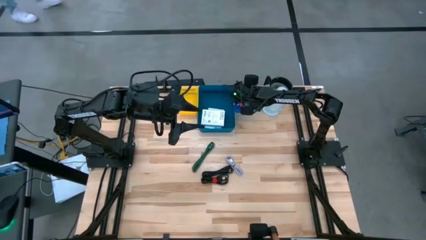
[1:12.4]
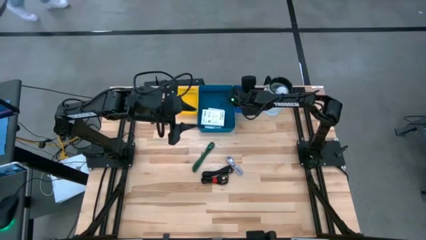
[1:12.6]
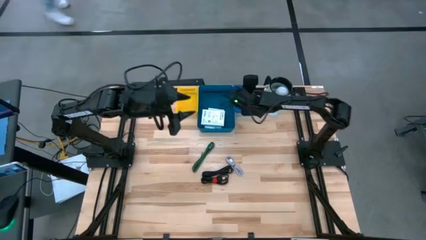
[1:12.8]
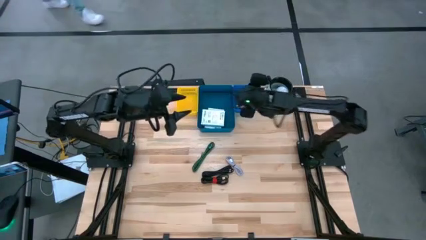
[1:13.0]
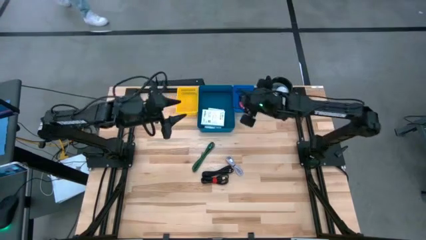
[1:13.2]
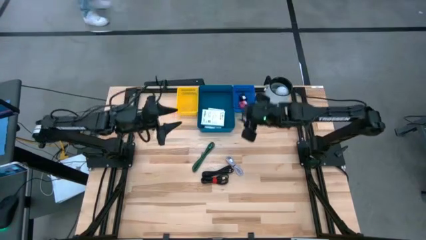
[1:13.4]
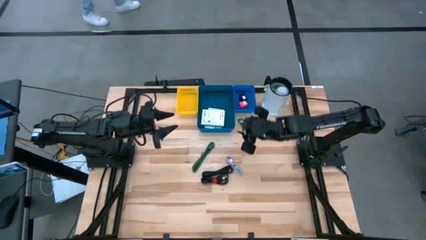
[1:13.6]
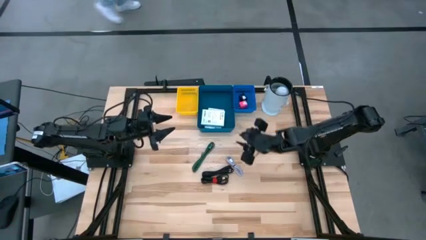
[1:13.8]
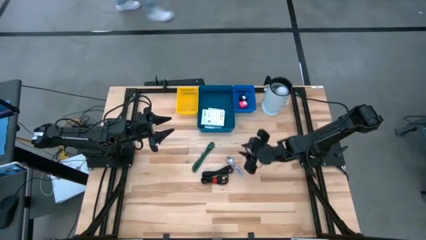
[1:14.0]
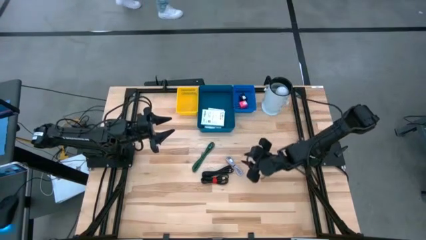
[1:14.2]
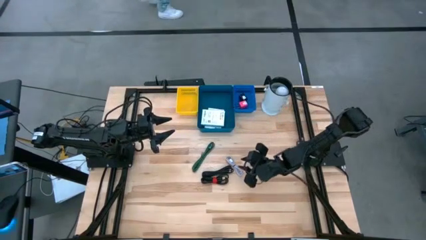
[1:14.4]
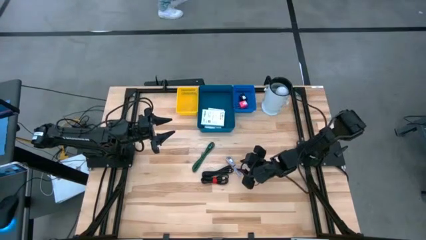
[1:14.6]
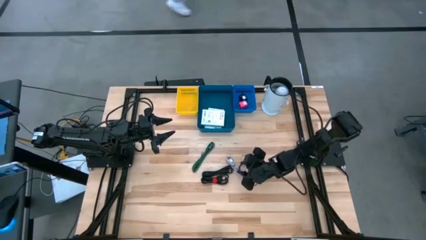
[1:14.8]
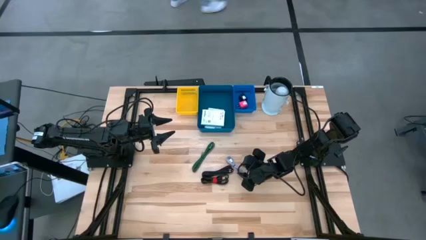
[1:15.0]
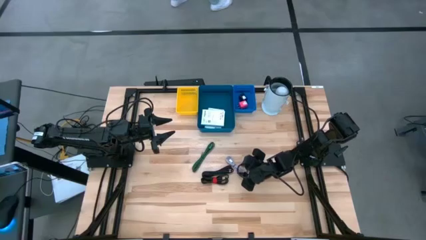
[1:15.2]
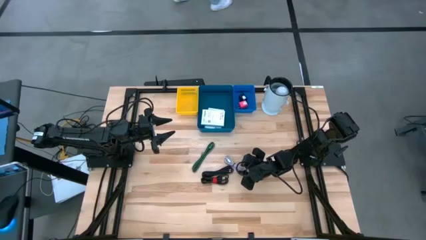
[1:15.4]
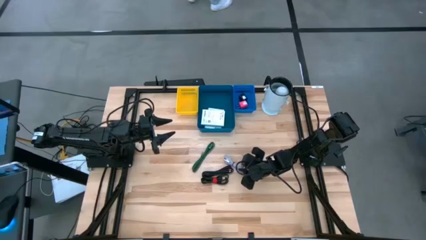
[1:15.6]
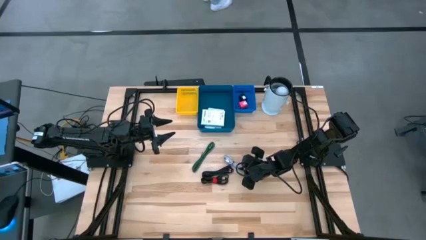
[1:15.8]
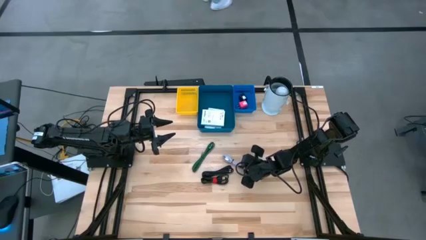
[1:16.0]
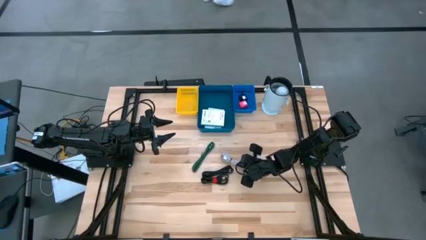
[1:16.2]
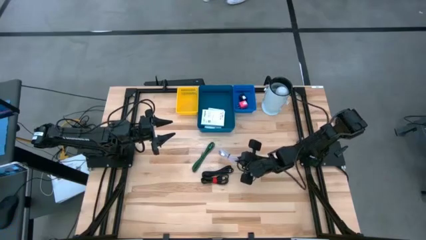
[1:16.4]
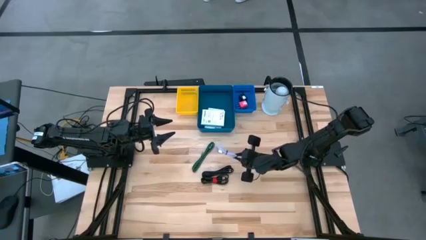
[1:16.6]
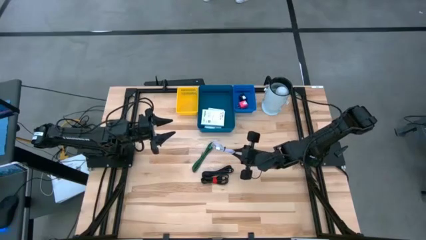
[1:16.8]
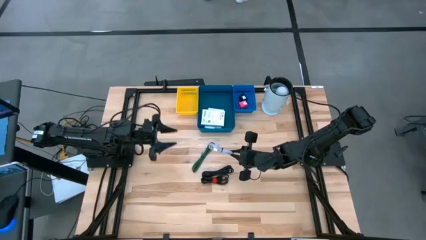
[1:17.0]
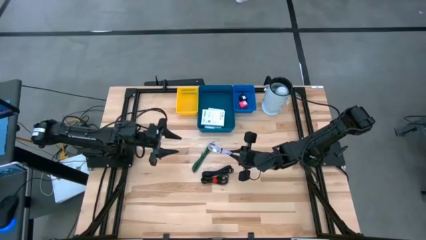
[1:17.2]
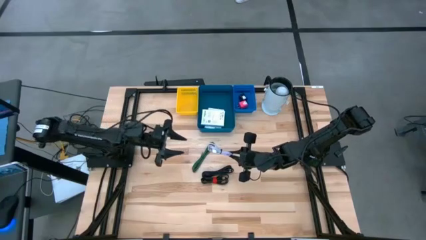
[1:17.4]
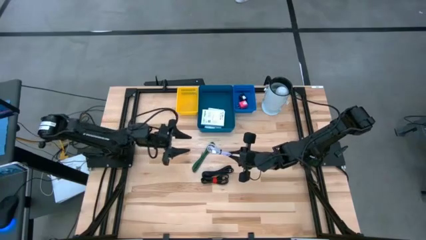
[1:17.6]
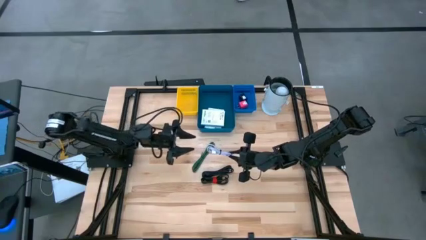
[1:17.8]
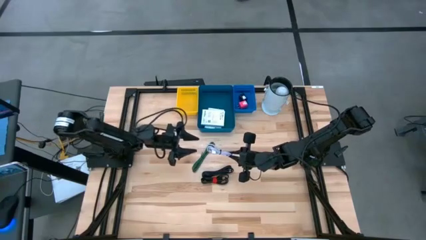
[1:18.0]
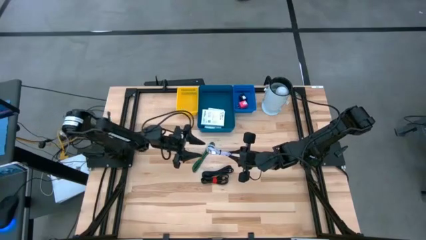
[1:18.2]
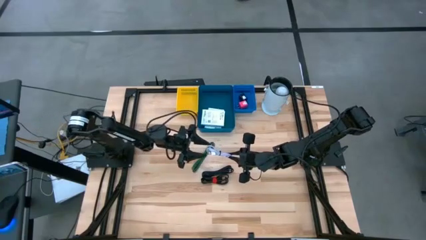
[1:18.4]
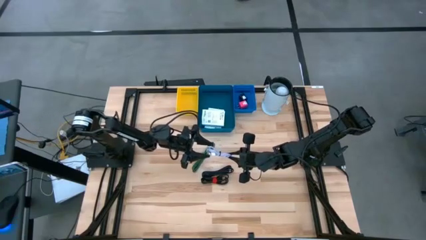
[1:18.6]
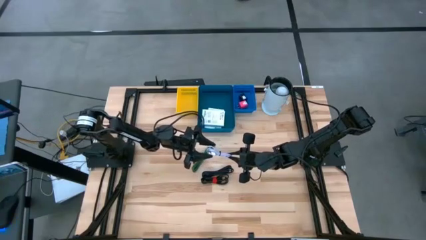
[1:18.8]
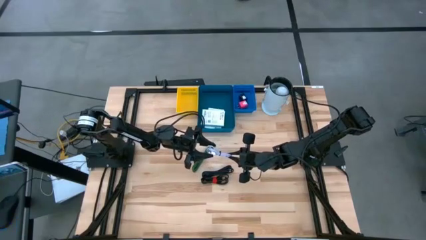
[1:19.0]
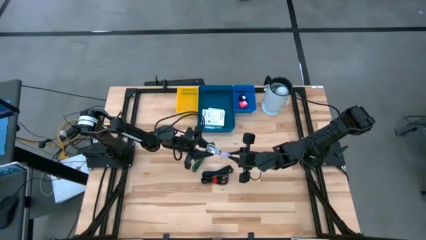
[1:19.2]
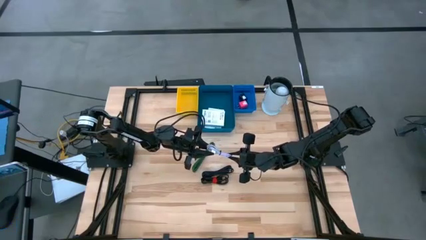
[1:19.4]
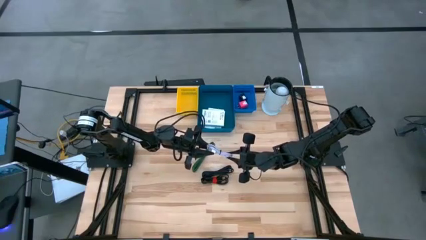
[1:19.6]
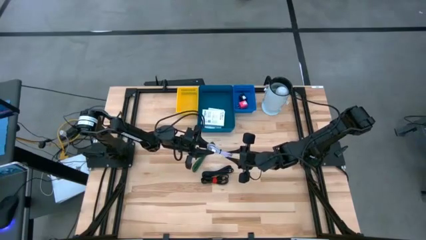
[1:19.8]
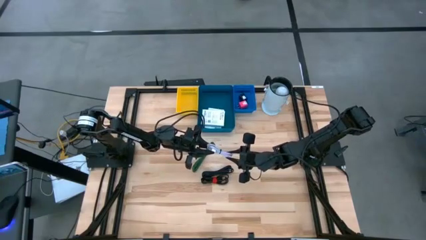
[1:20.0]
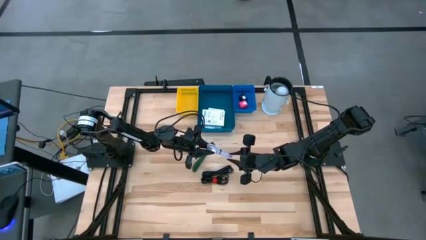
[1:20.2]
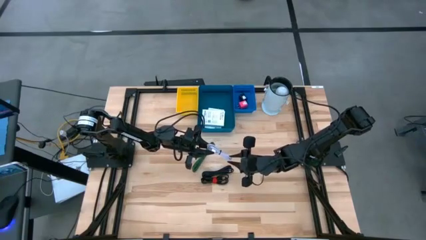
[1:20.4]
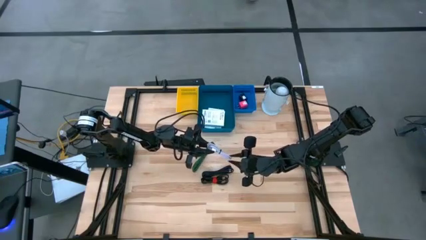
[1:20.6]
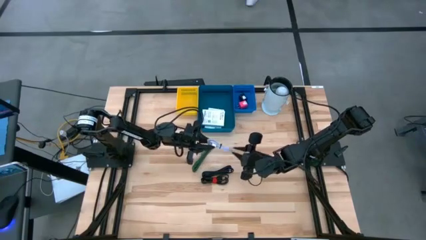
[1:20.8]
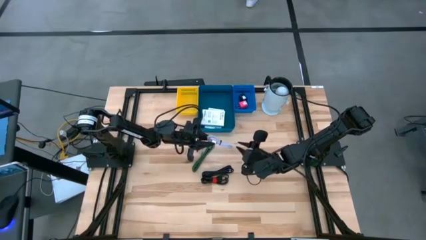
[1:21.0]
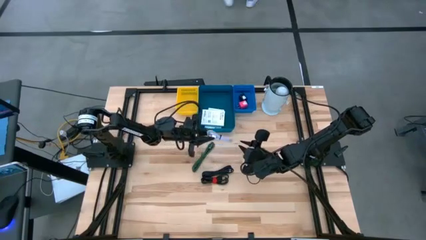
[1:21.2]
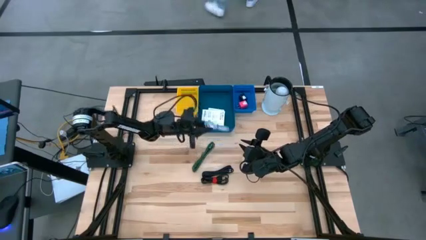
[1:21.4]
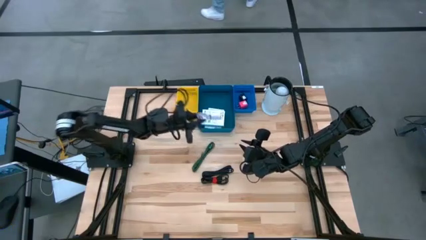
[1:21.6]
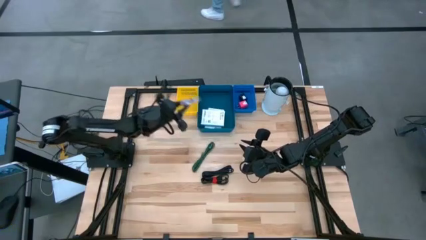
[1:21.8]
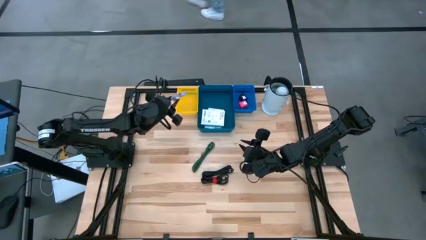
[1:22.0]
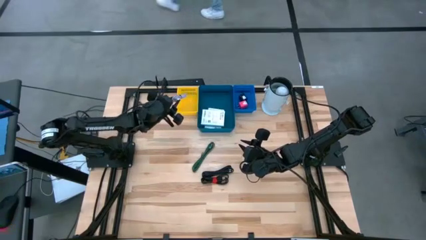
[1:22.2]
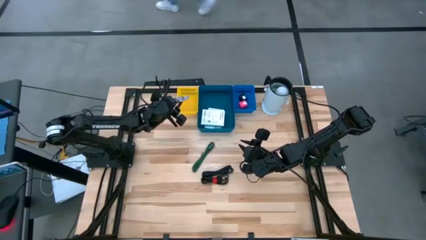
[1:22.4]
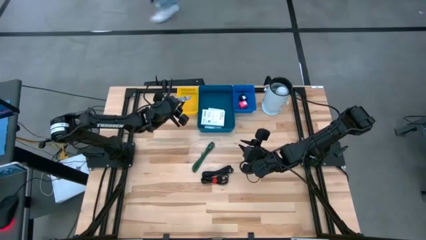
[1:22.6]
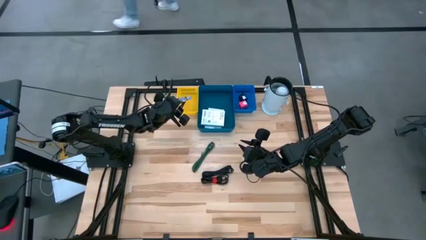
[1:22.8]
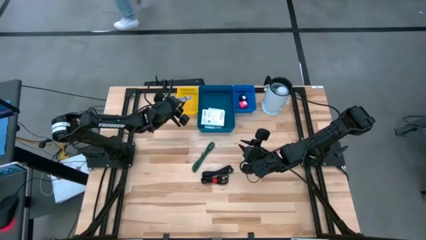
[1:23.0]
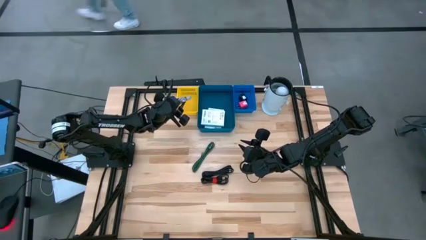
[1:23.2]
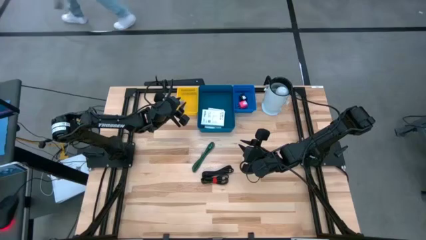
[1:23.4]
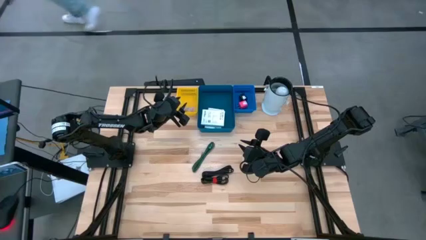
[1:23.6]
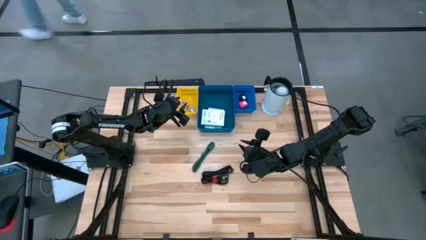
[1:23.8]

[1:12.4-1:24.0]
Task: Pick and place items into bin
Put the white charger cable into the yellow bin
